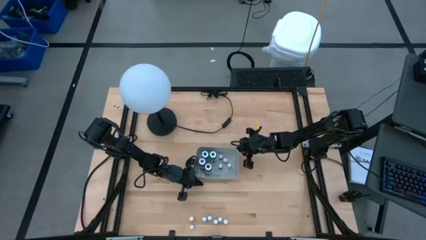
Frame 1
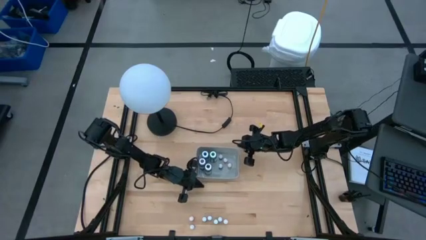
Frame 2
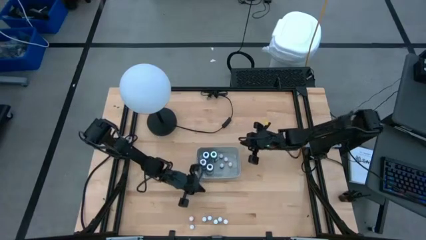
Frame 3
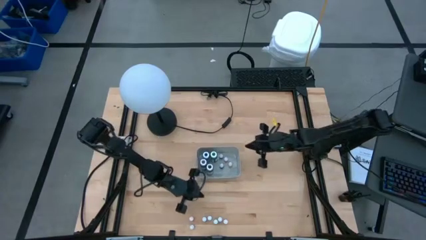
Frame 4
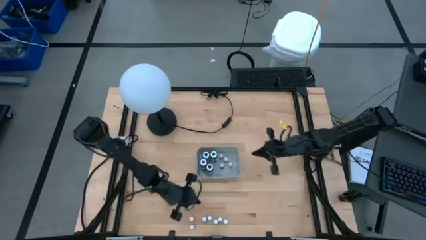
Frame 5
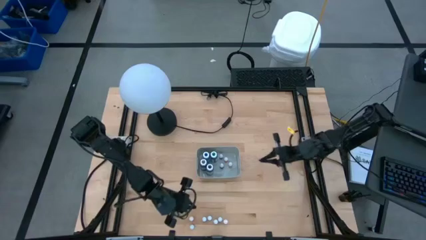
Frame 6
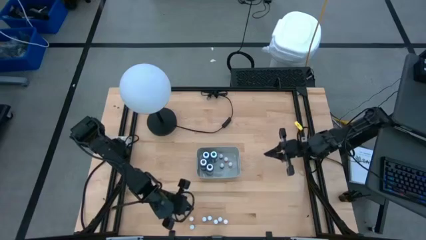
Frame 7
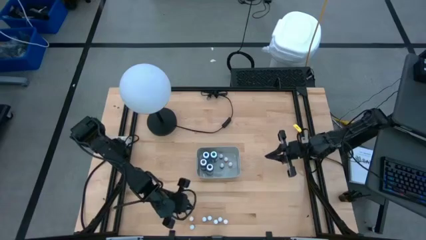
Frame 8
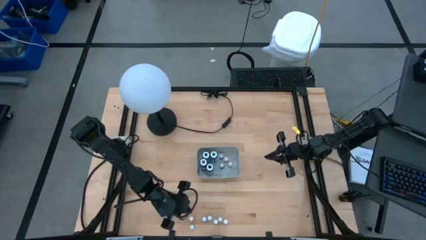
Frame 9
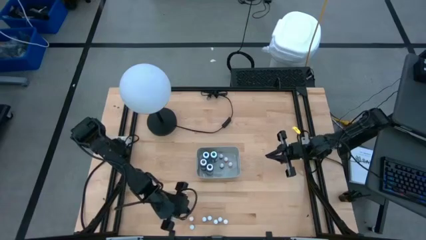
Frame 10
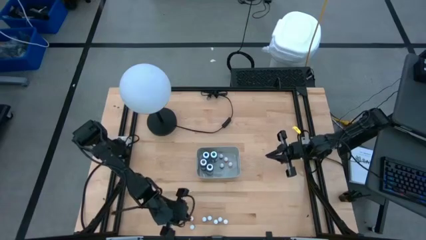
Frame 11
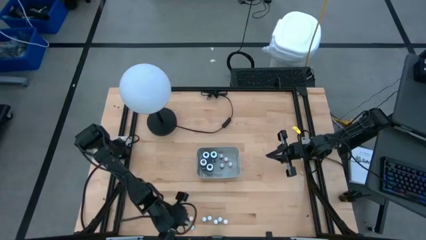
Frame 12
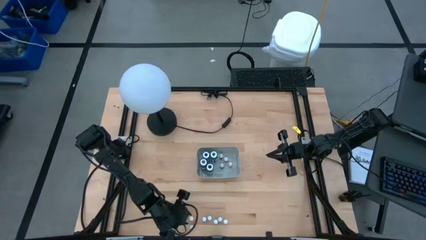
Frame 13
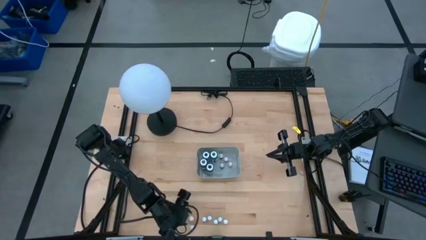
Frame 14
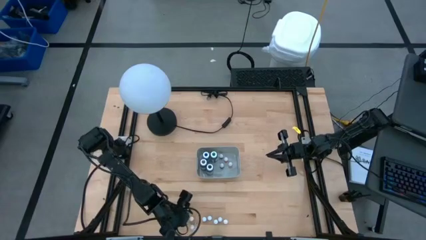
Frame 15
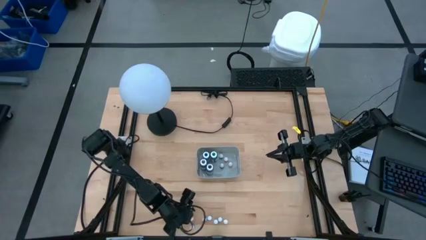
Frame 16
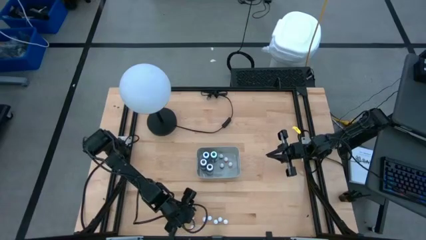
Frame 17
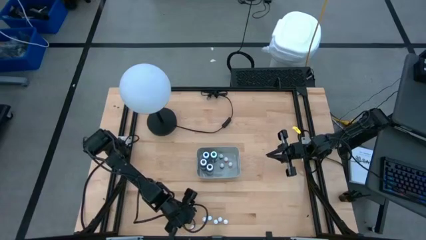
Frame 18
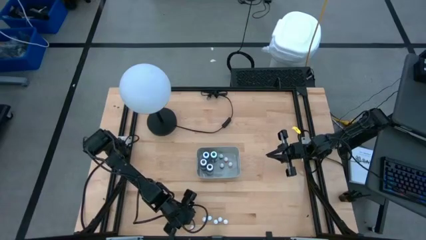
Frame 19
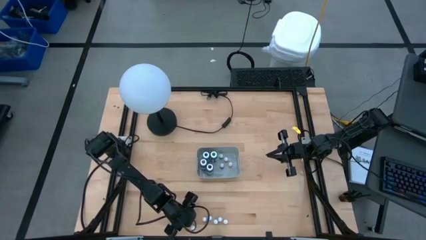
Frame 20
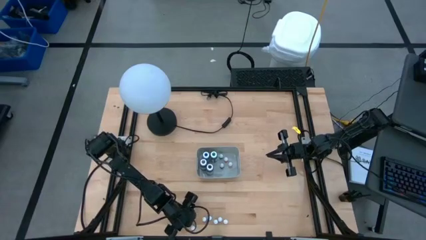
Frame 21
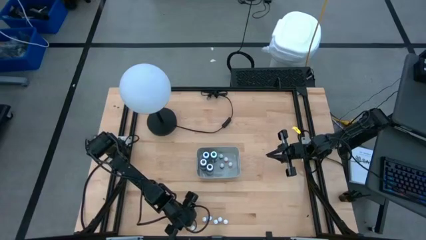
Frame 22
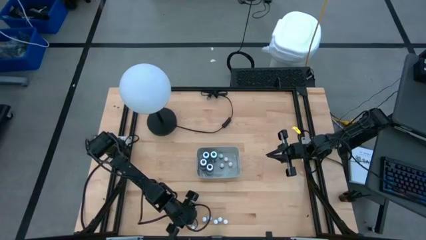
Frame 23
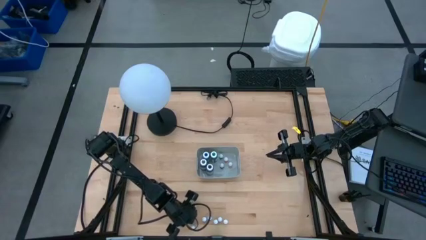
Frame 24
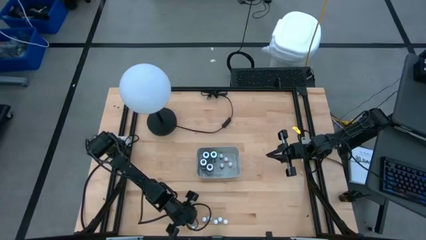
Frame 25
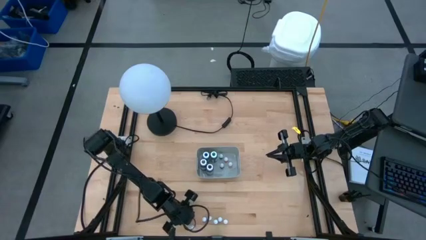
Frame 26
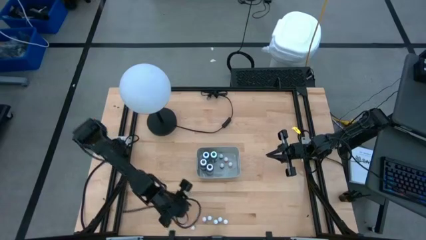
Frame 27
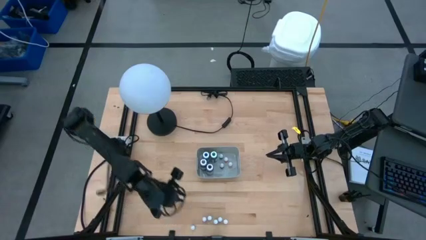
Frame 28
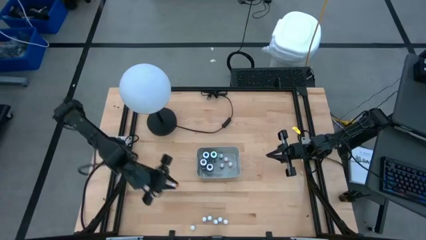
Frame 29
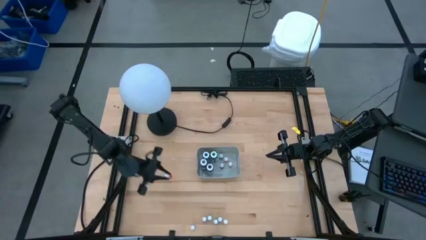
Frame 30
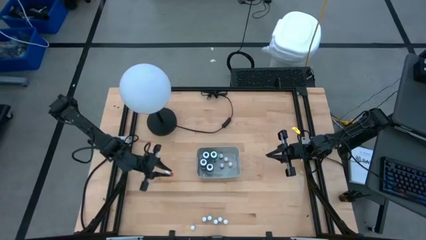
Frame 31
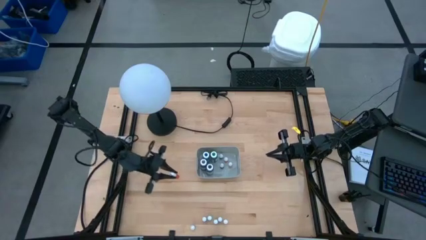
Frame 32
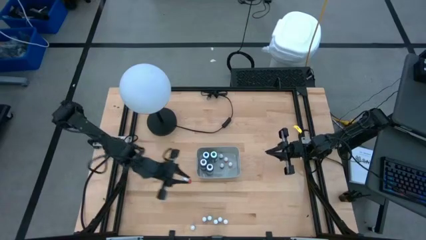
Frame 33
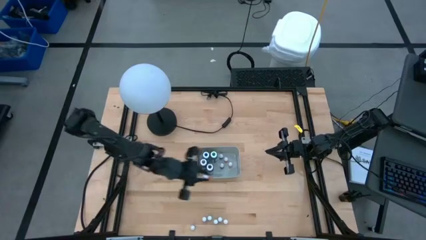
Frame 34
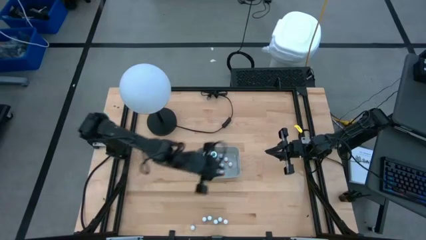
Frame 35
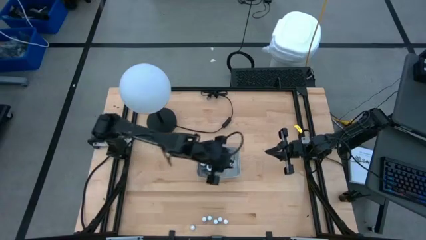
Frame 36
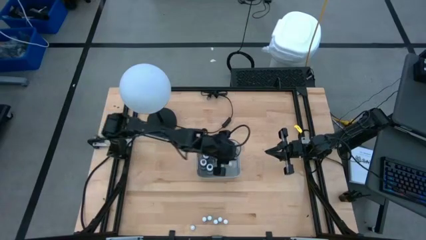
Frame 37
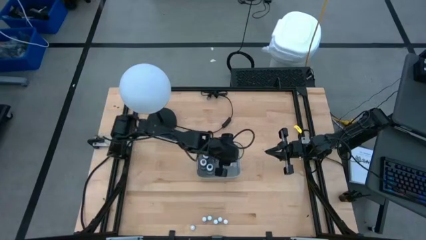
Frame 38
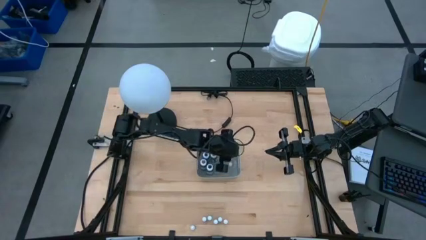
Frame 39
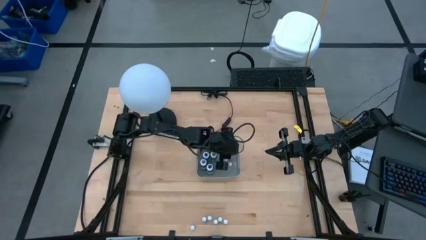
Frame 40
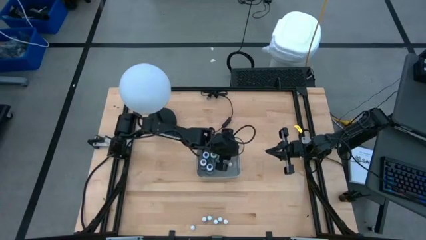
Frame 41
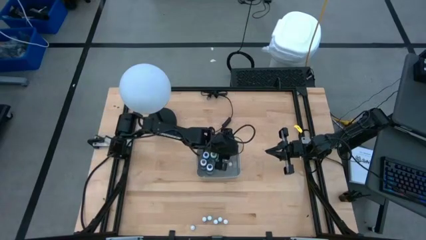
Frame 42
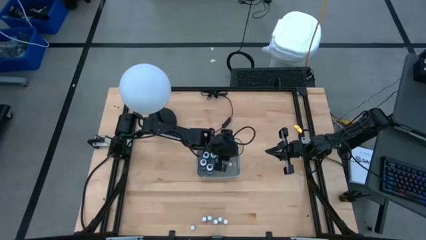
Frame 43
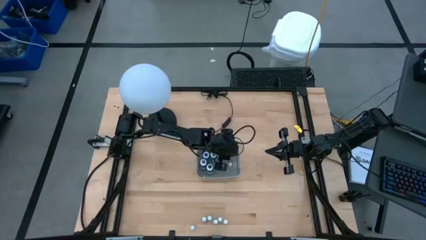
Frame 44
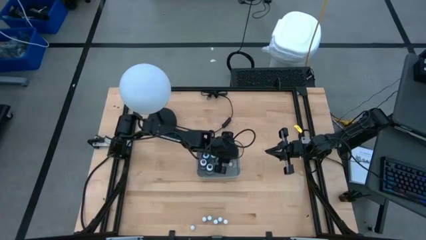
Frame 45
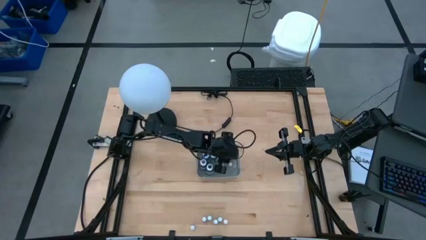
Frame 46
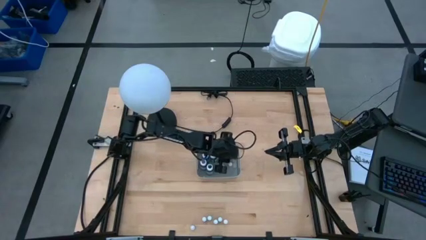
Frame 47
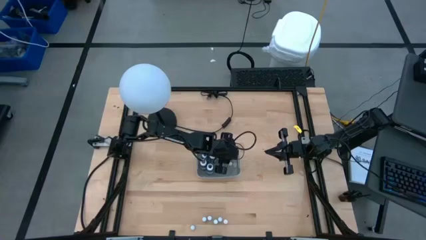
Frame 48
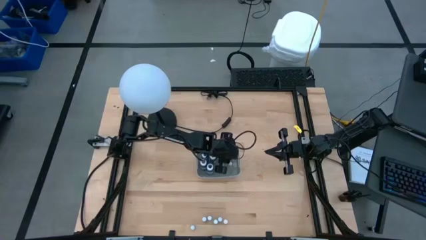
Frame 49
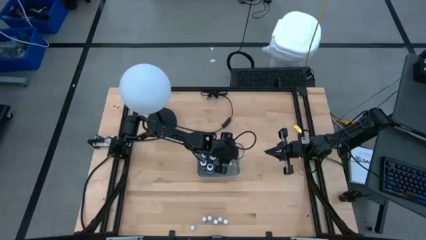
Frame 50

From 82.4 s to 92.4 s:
Task: Pick & Place food coloring
Put the small orange food coloring bottle into the gray bin

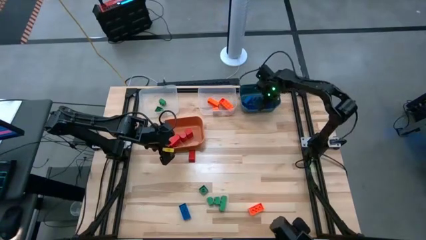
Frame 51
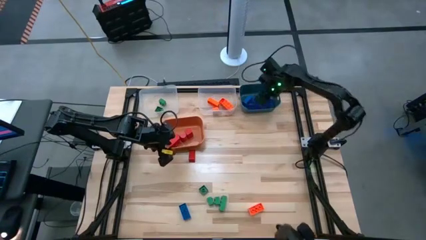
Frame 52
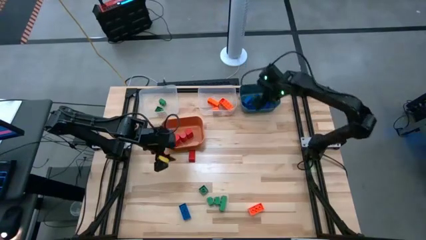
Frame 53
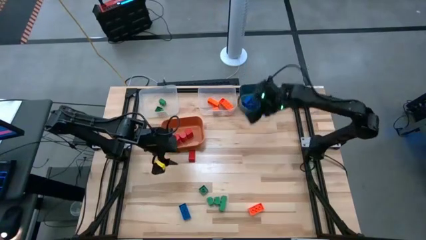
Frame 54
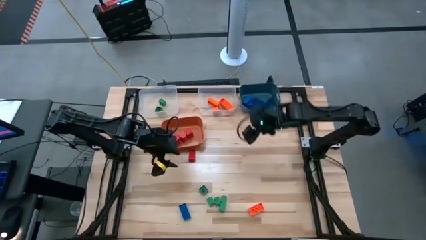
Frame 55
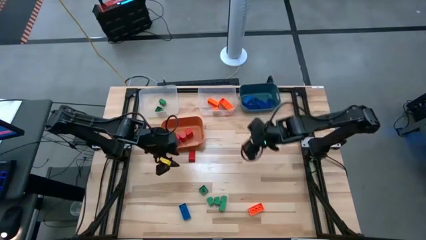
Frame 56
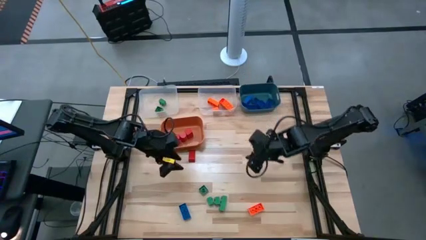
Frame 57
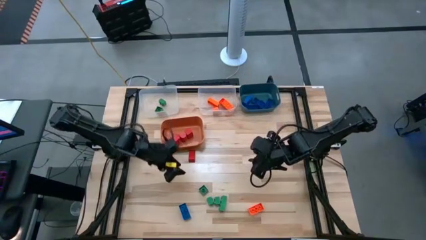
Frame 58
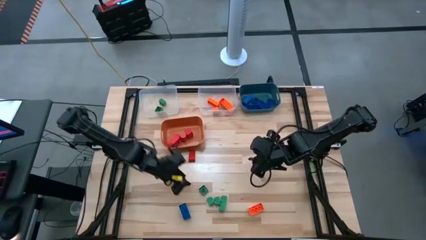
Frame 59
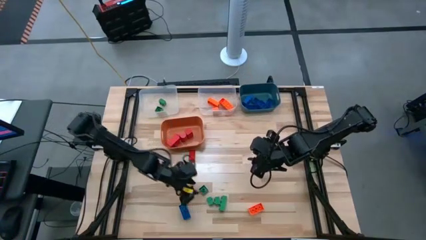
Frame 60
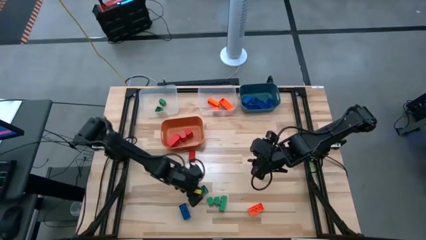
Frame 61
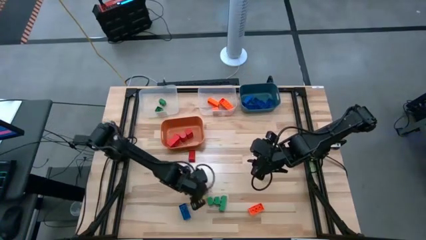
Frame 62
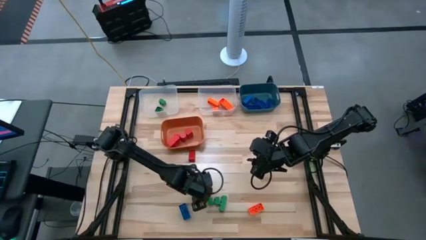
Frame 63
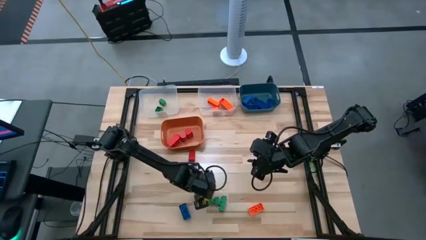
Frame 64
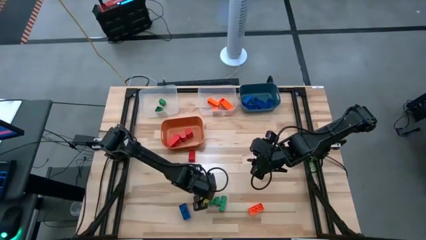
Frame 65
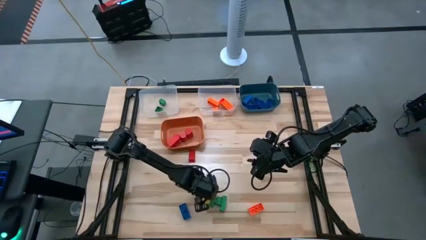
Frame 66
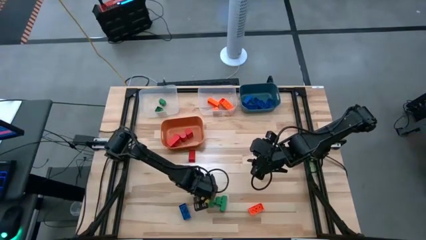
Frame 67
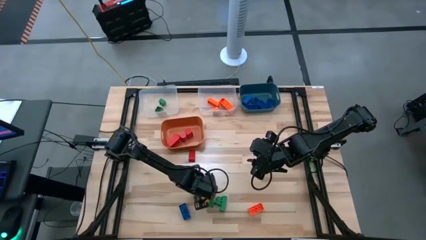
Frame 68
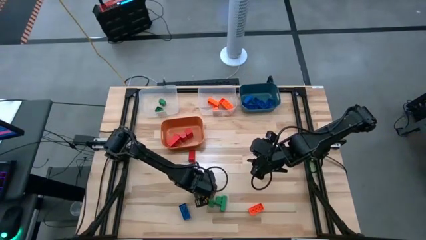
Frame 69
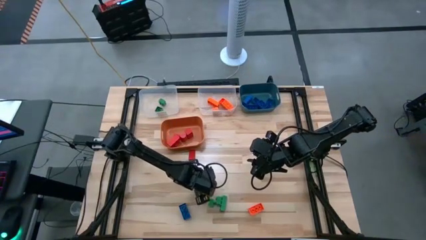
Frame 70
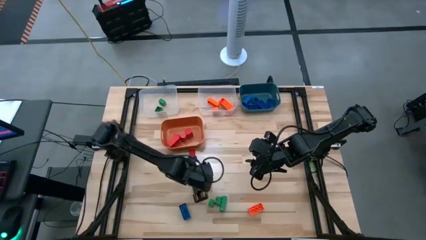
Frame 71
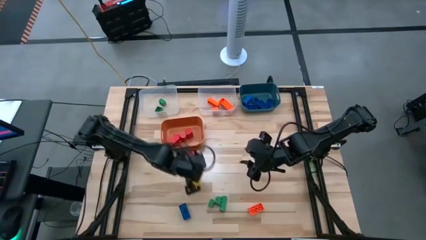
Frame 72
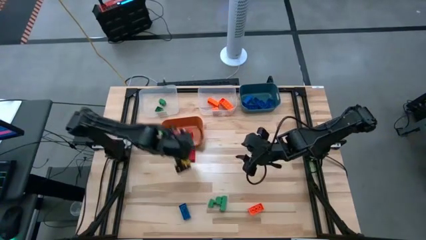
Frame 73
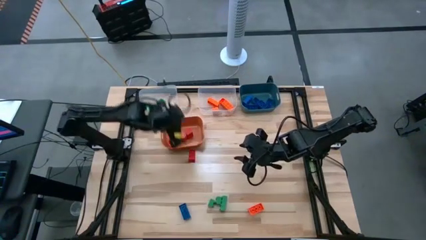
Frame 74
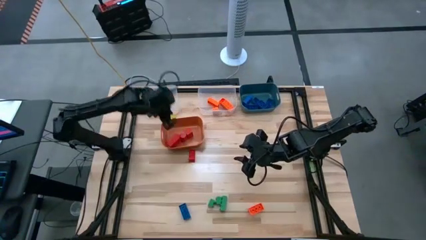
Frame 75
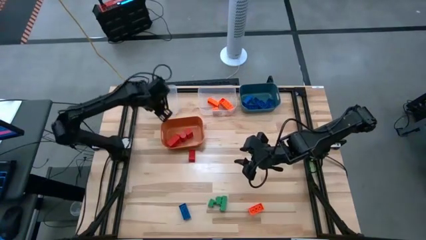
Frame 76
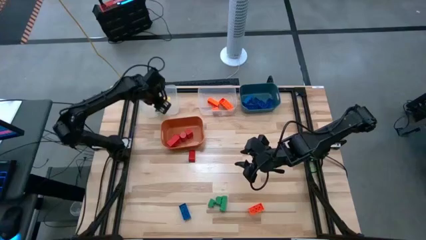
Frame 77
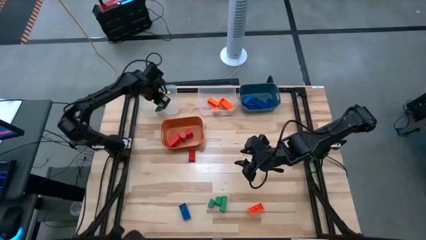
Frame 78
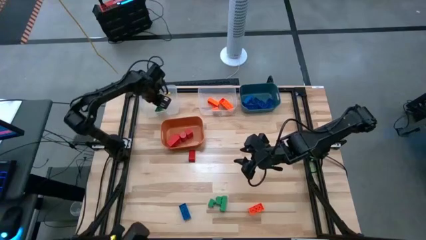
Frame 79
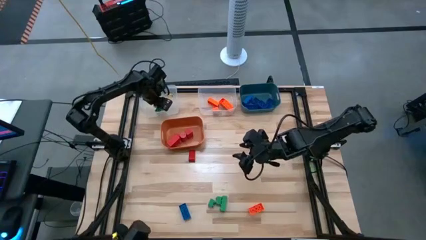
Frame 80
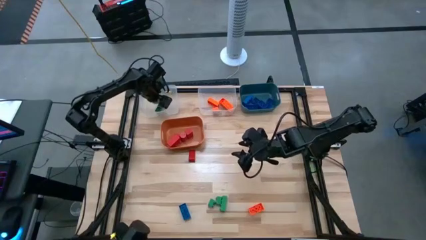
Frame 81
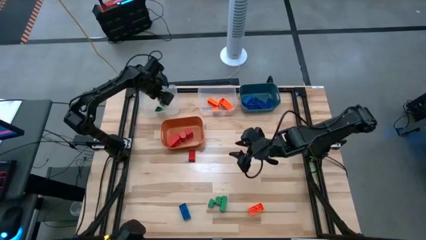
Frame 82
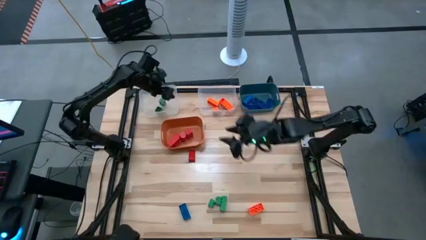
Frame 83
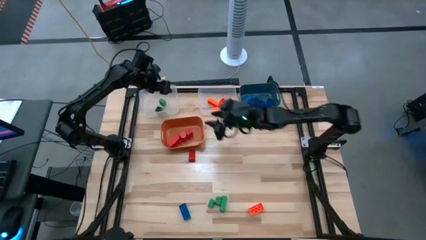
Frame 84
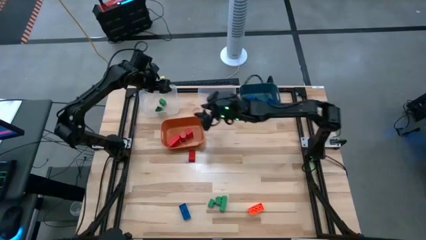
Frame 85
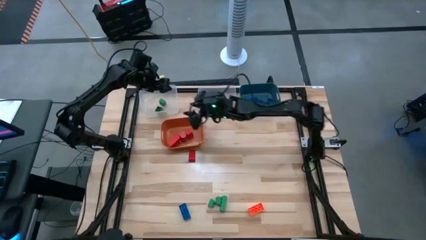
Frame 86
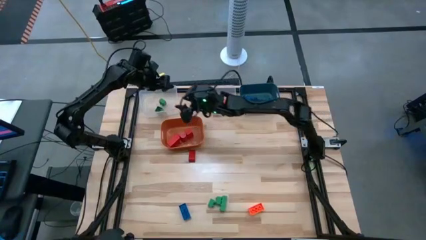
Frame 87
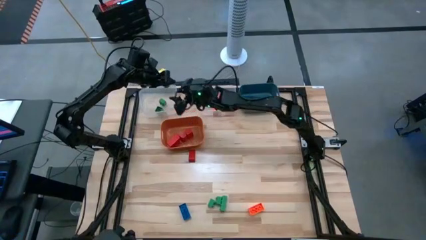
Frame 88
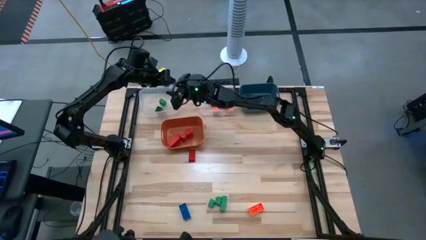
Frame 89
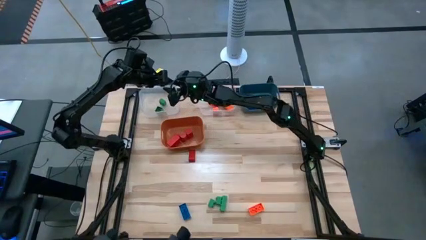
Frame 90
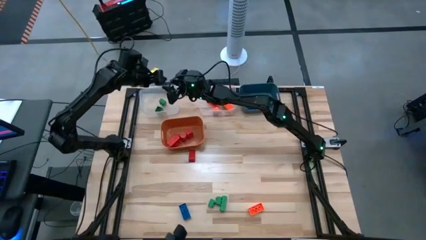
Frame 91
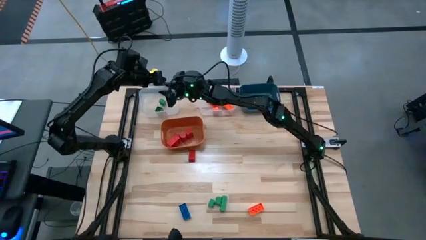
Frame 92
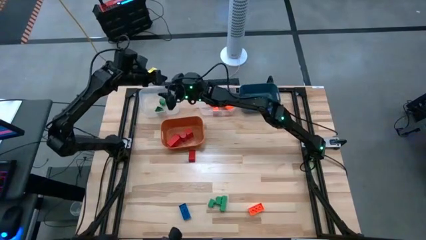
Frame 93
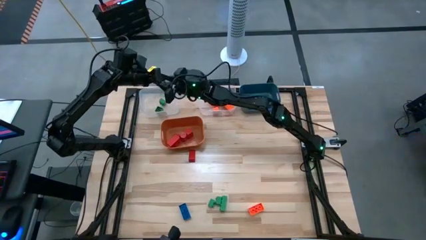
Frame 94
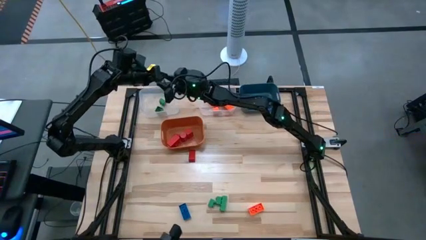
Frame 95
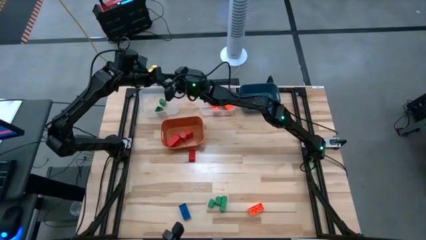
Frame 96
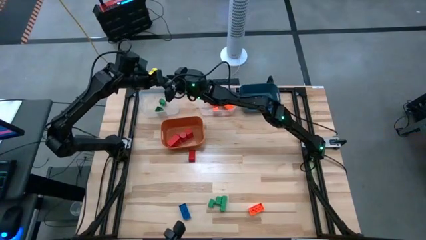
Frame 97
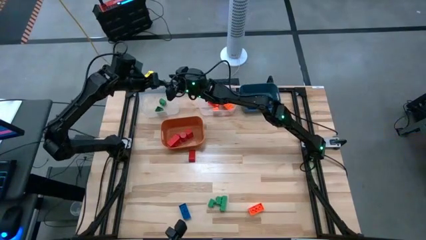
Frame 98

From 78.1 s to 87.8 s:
Task: Sort blocks
Put the green game piece into the left transparent bin
